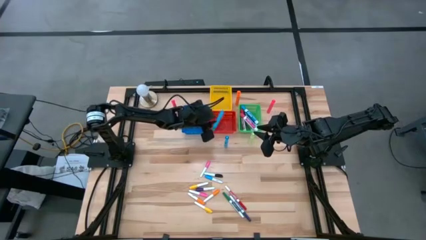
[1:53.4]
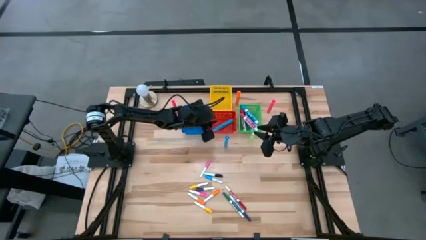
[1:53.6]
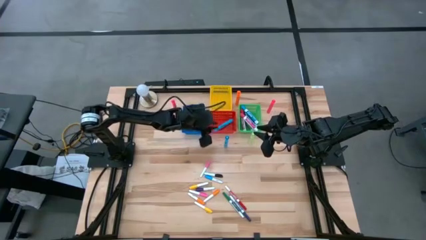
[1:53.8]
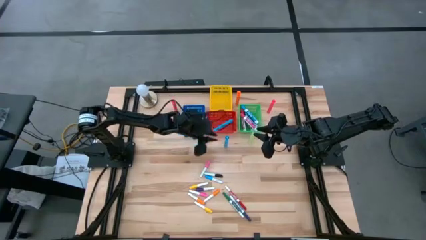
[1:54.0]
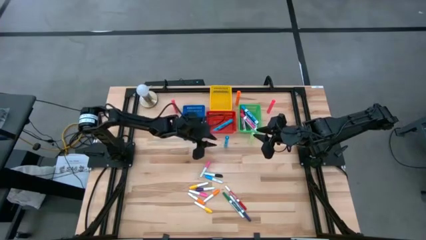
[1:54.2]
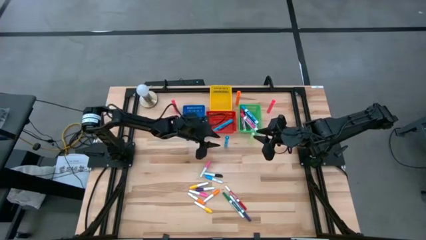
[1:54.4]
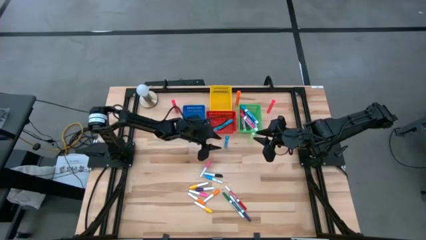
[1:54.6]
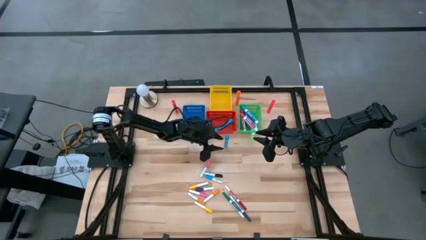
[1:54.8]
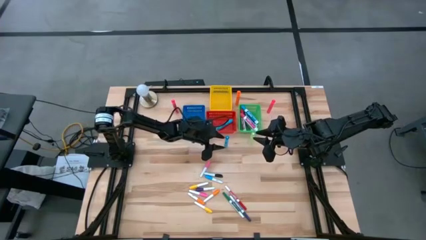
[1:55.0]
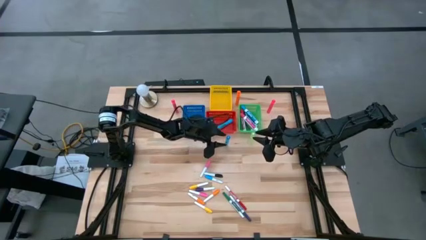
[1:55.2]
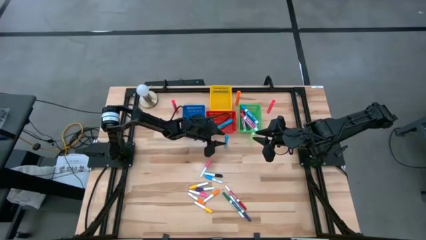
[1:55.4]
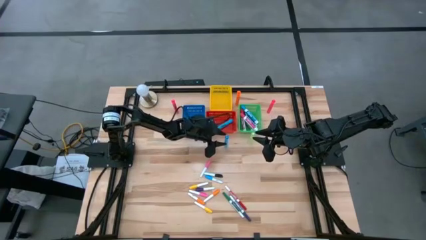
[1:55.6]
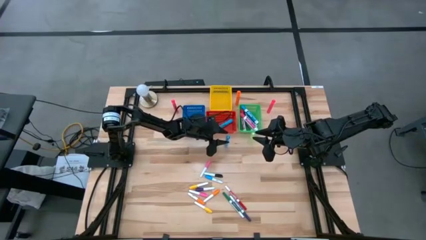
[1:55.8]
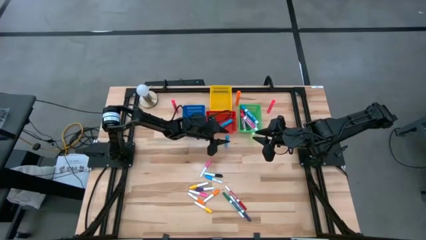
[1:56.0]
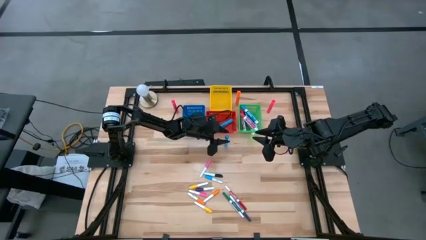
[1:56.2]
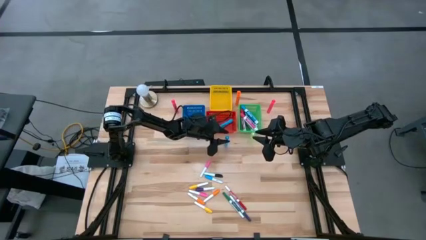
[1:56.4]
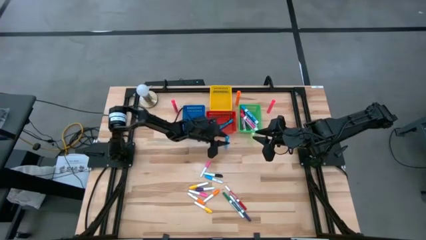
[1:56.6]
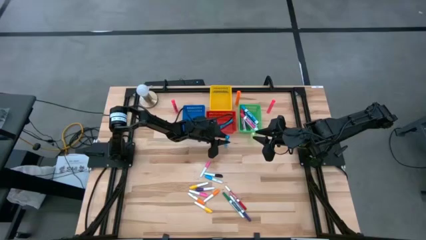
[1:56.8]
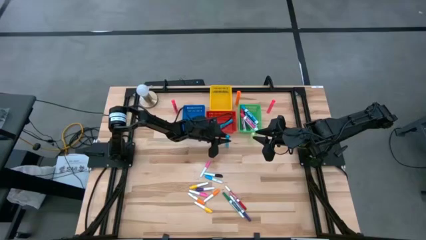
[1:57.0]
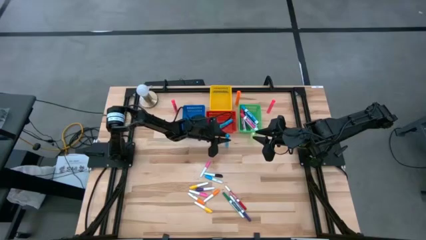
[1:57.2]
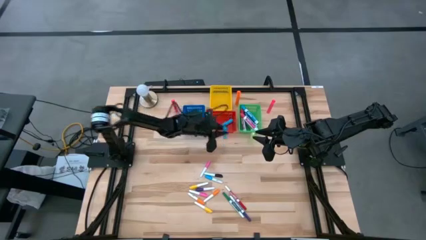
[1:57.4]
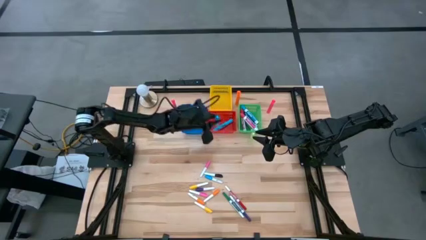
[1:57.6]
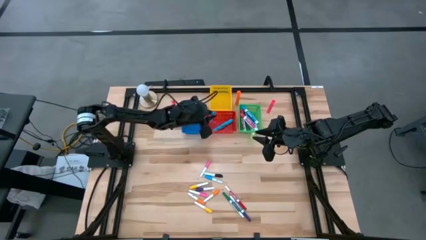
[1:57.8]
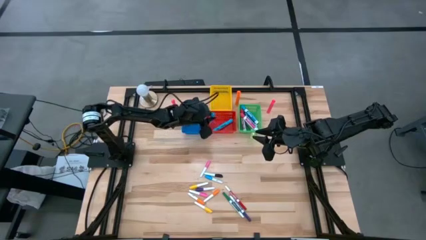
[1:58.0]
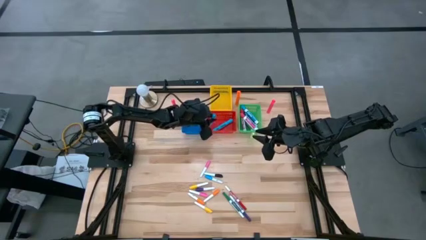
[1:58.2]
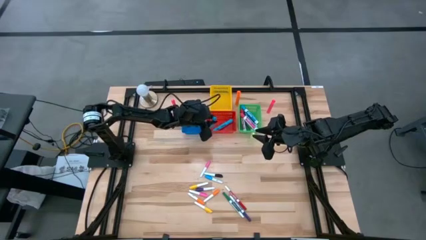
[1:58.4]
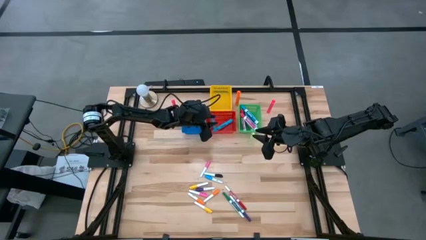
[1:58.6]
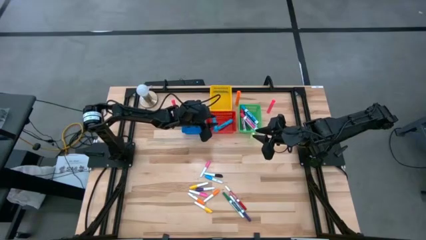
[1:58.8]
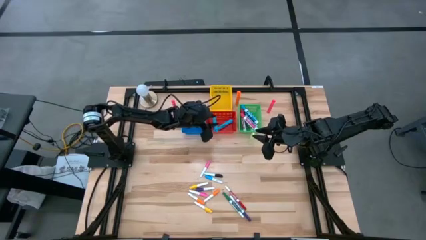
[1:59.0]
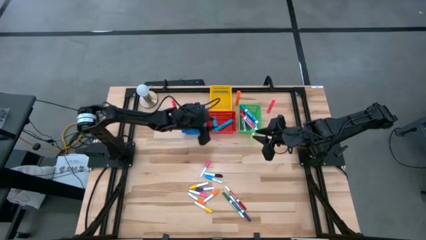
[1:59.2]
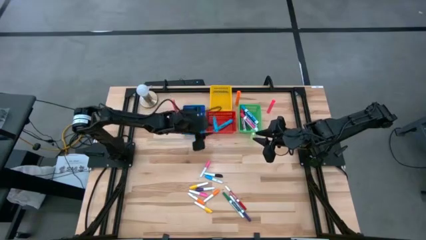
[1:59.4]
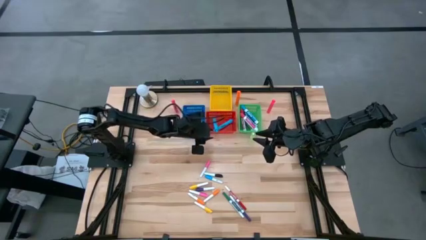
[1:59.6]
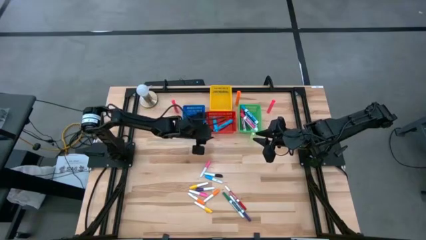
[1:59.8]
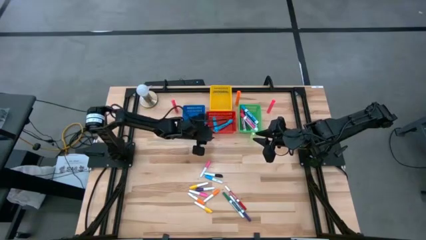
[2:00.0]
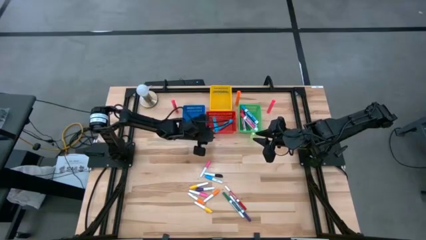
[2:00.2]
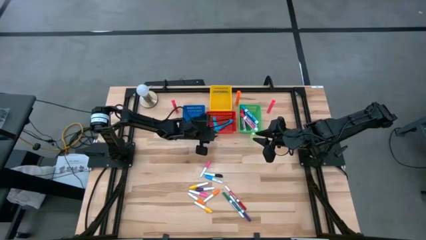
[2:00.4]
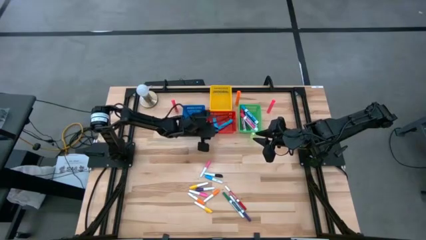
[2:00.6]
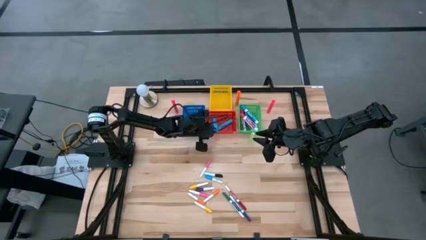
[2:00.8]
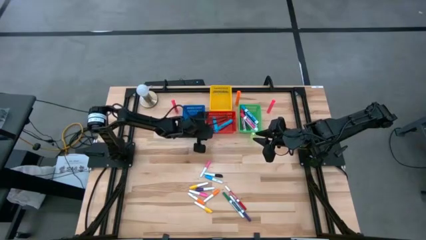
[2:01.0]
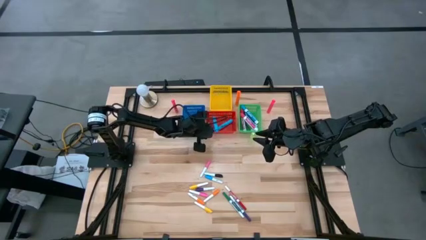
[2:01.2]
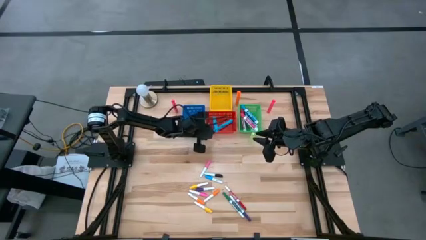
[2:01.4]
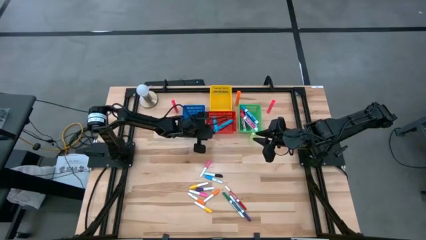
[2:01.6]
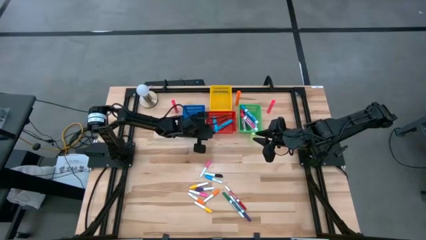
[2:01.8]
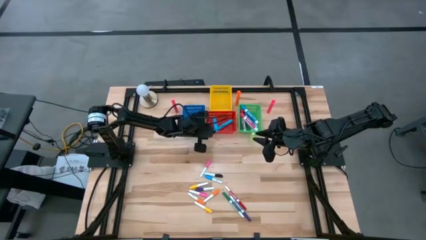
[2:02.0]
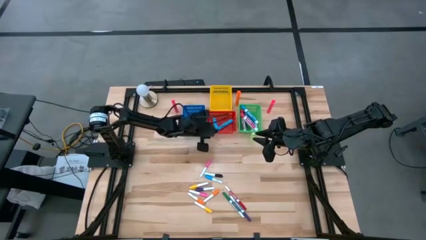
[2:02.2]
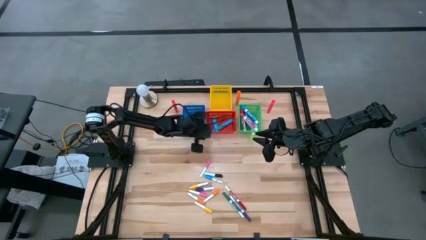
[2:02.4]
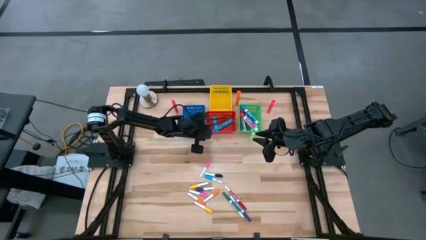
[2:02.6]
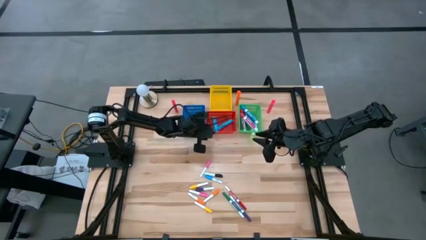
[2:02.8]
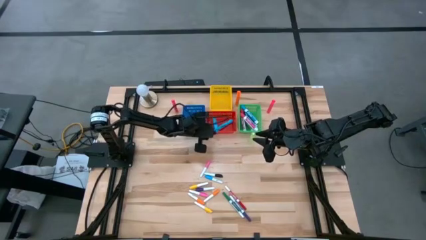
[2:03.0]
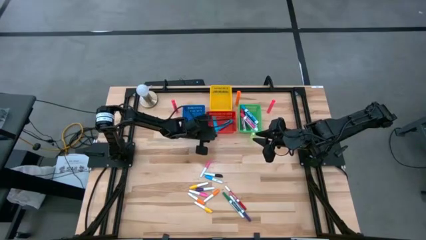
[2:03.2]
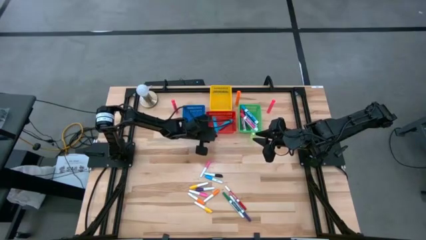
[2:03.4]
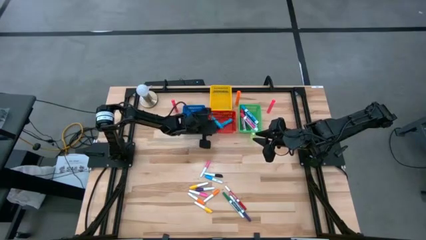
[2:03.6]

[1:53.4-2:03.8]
Task: Pick & Place Markers
Put the large light blue highlighter pen into the red bin

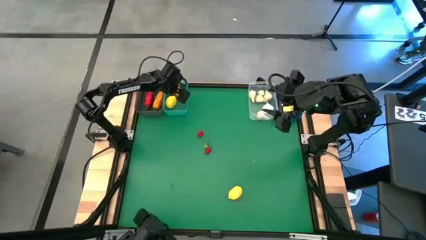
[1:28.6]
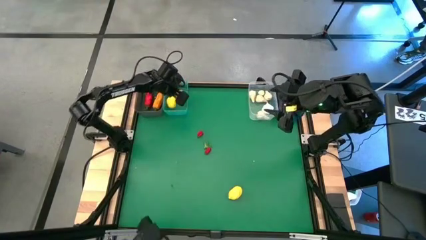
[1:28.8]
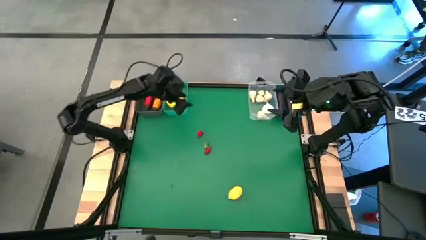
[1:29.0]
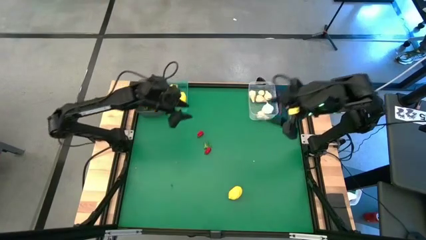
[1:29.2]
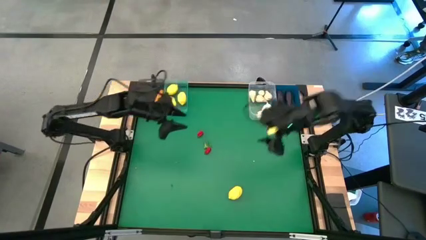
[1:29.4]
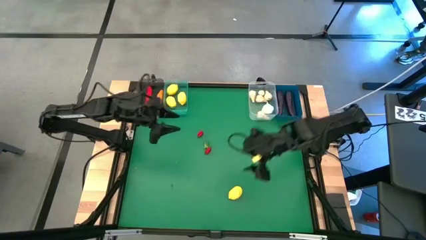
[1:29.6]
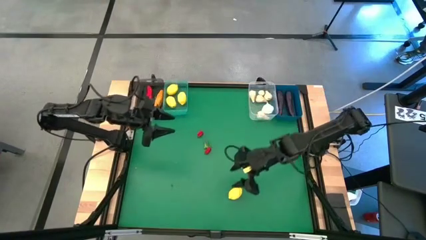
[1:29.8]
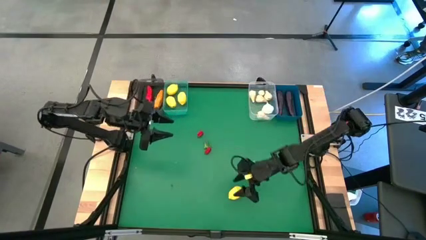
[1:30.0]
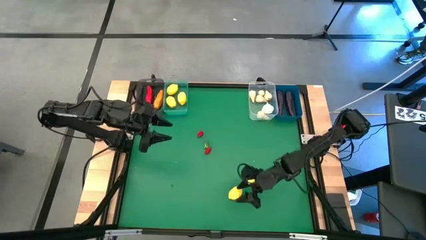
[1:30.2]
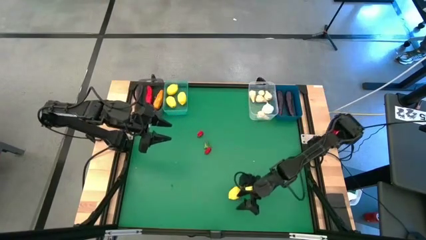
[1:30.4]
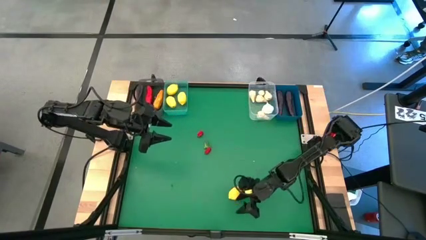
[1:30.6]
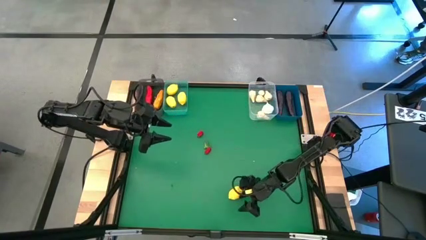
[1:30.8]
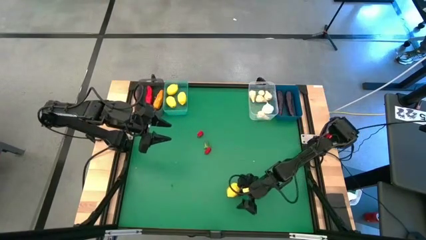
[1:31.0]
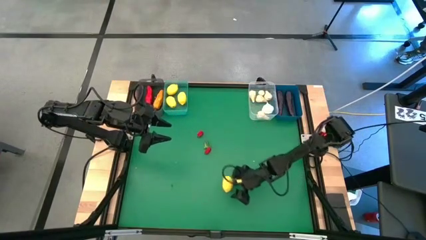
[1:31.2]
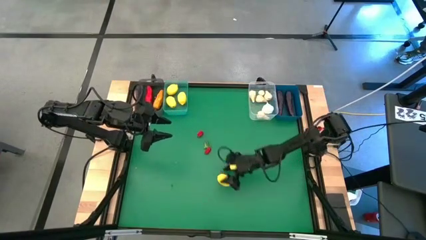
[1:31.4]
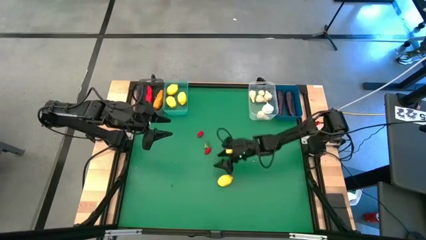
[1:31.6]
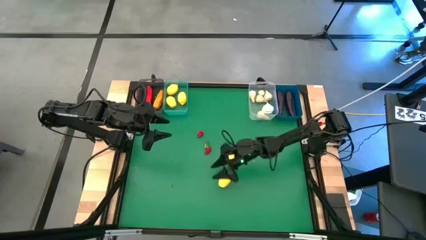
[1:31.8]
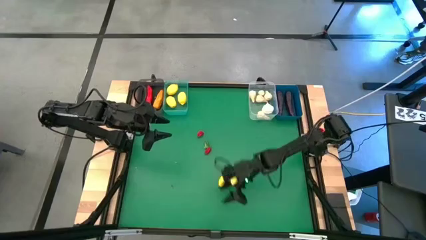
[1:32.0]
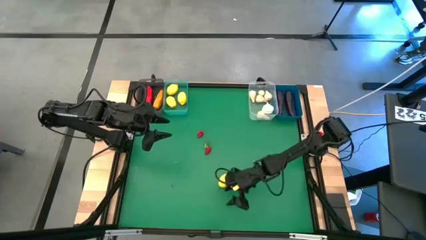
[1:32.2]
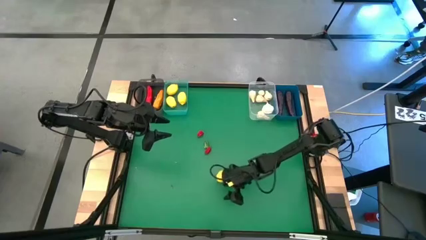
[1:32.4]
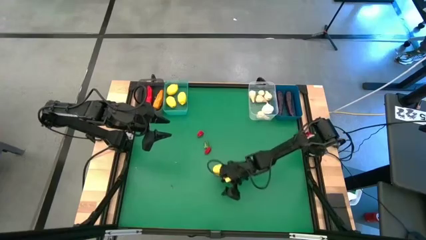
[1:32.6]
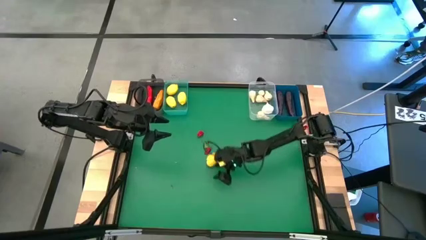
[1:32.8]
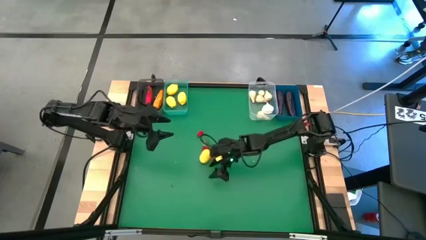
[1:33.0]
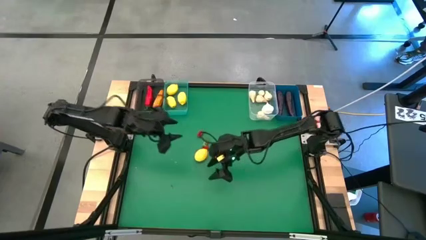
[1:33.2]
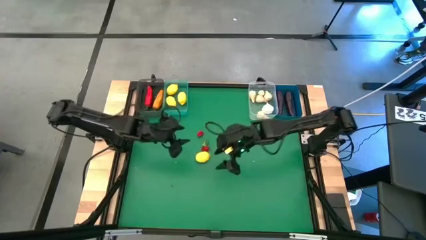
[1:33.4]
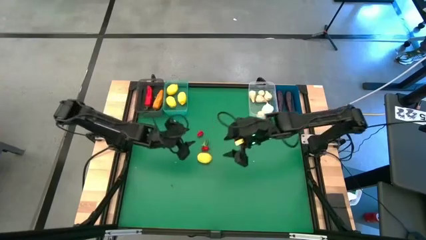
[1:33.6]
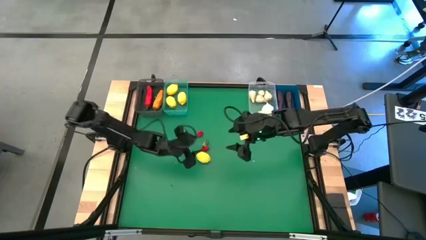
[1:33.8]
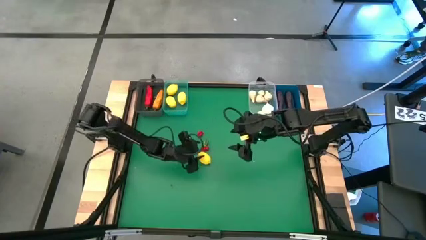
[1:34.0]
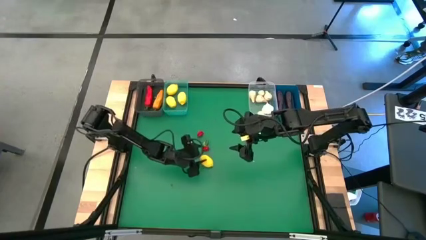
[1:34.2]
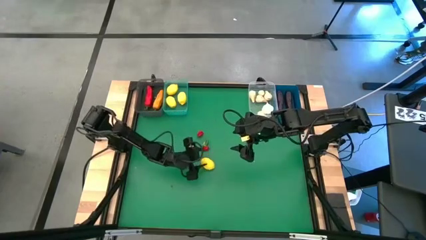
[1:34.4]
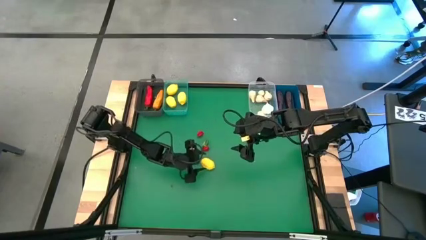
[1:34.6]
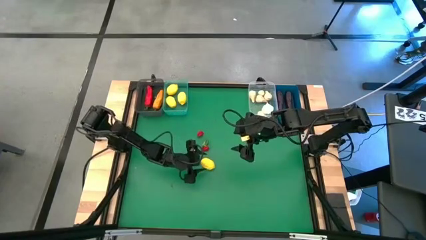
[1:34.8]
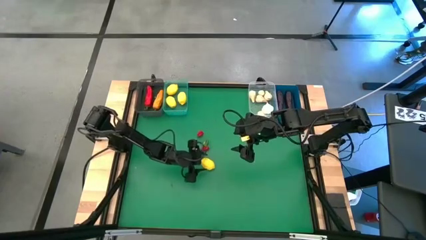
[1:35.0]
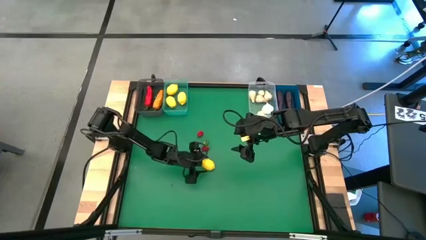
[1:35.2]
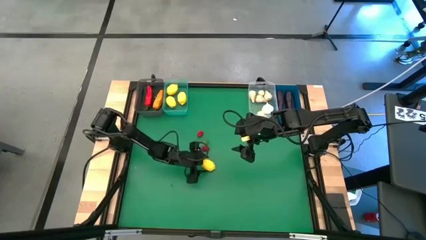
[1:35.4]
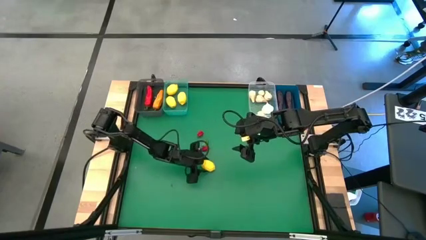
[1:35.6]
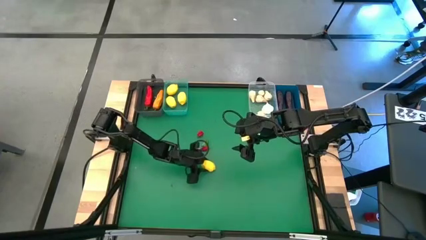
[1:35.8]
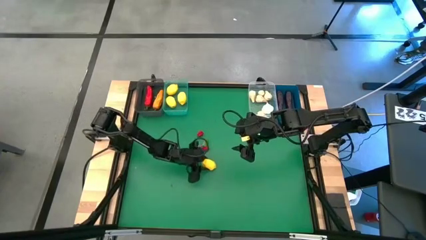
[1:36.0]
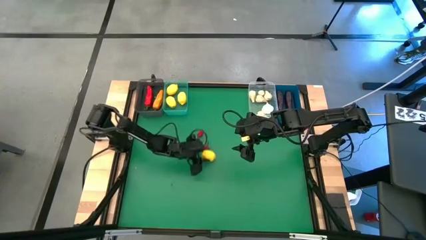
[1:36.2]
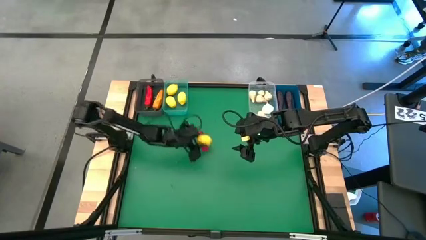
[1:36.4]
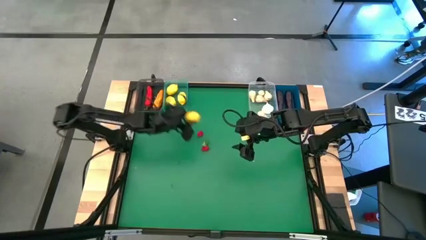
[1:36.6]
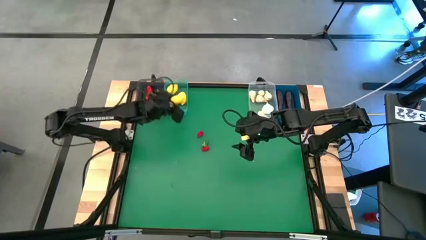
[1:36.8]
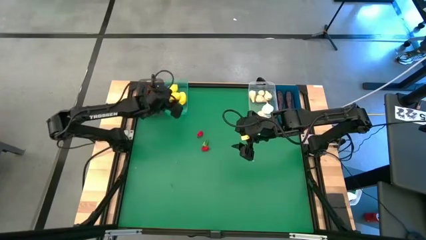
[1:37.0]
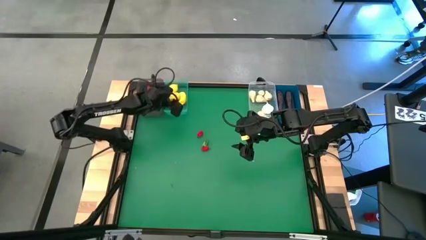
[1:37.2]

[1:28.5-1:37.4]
Task: Sort produce into baskets
Put the lemon into the transparent light blue bin
